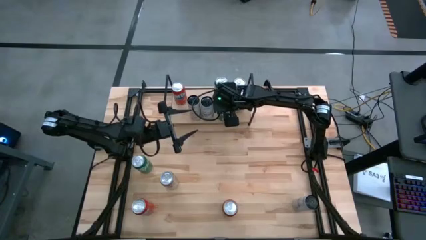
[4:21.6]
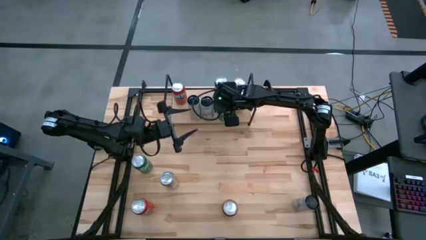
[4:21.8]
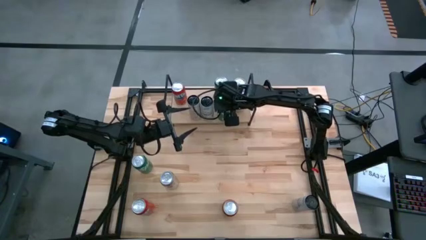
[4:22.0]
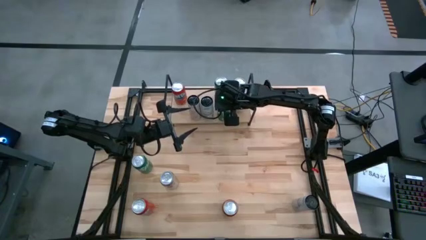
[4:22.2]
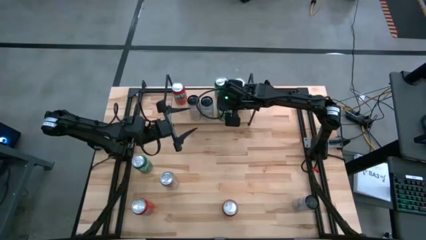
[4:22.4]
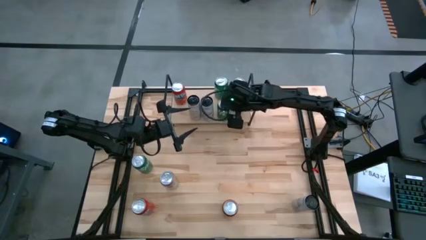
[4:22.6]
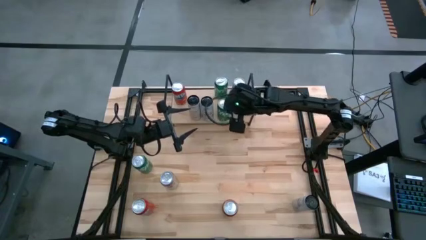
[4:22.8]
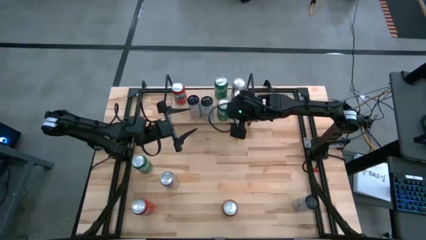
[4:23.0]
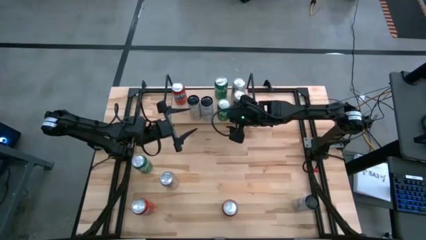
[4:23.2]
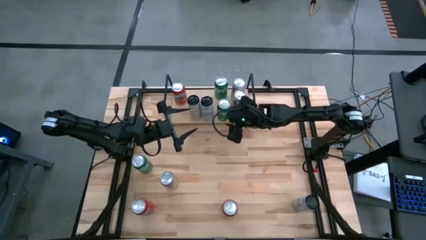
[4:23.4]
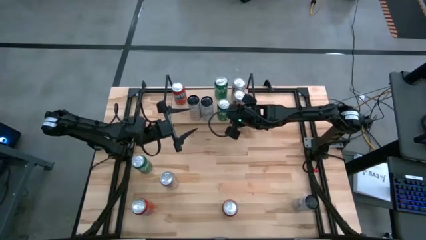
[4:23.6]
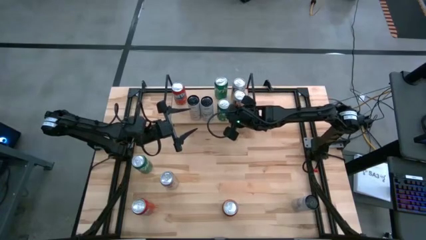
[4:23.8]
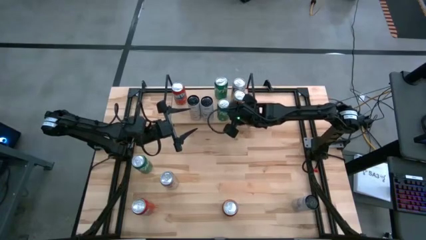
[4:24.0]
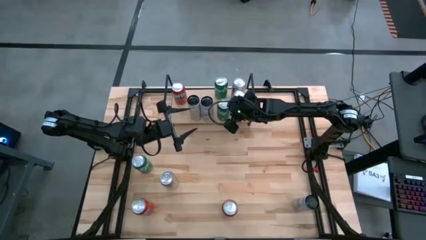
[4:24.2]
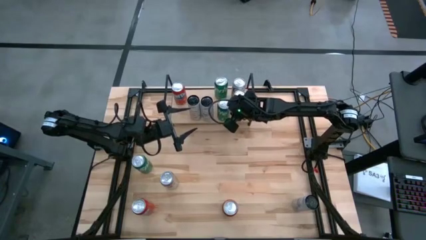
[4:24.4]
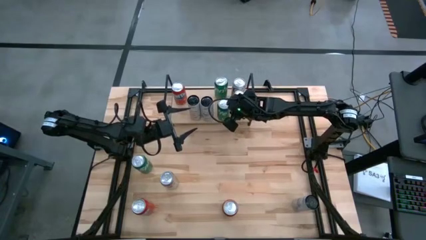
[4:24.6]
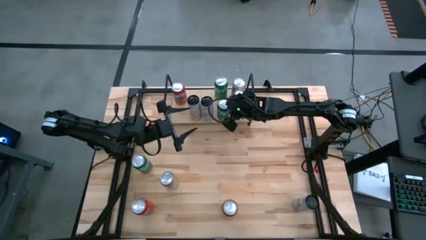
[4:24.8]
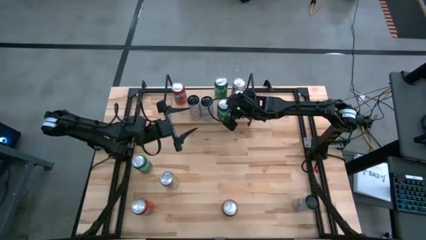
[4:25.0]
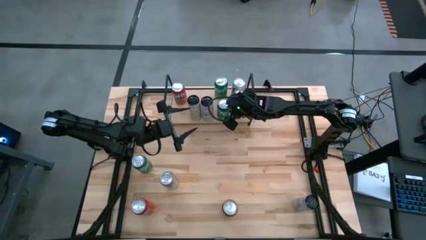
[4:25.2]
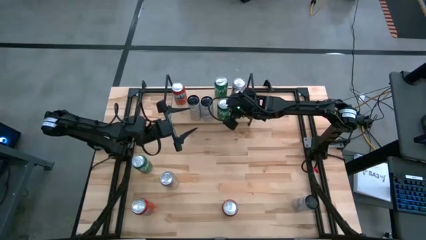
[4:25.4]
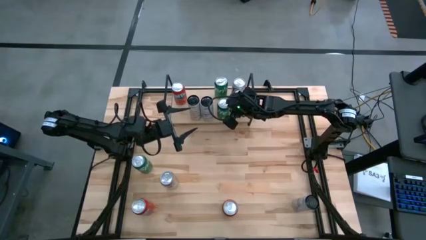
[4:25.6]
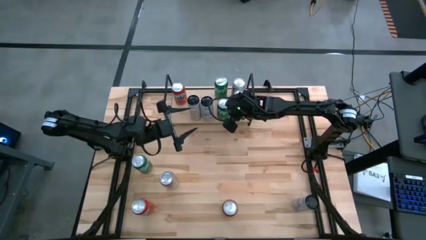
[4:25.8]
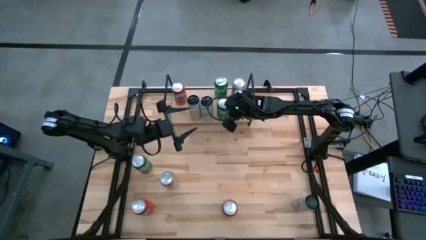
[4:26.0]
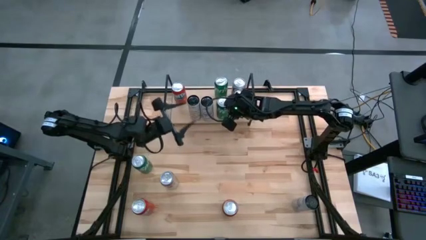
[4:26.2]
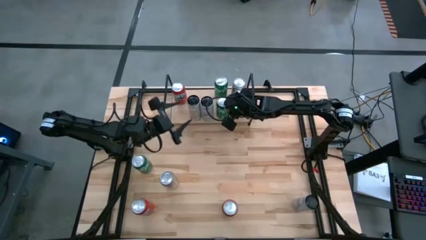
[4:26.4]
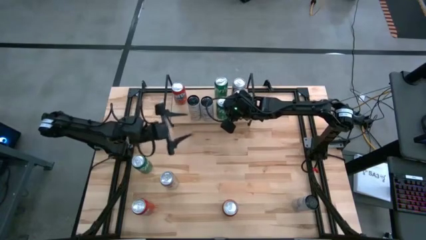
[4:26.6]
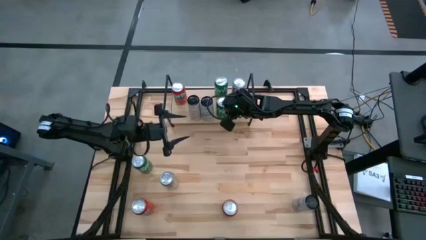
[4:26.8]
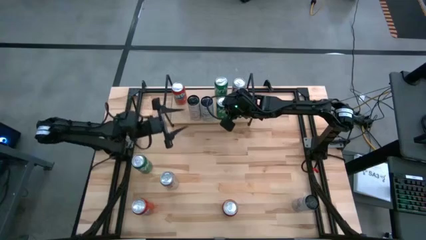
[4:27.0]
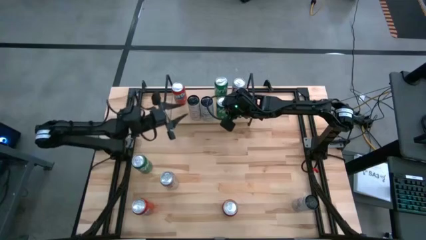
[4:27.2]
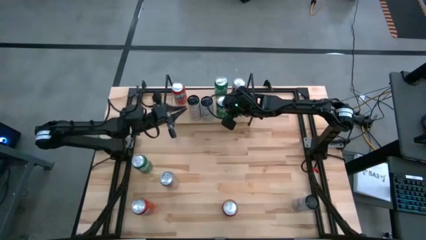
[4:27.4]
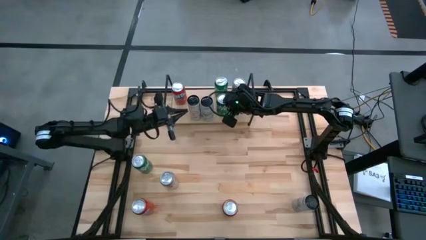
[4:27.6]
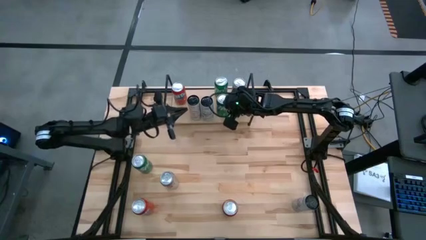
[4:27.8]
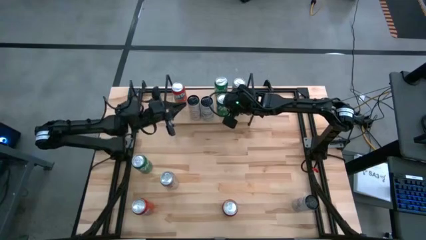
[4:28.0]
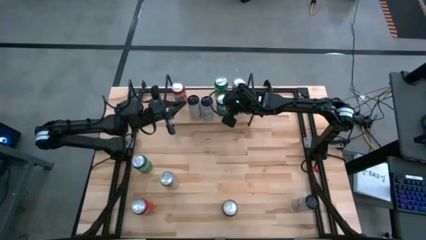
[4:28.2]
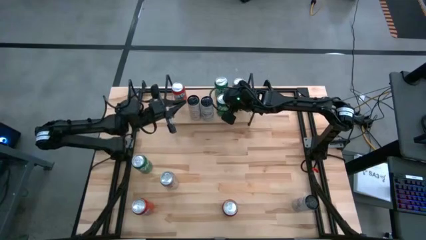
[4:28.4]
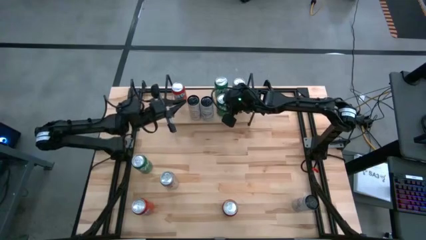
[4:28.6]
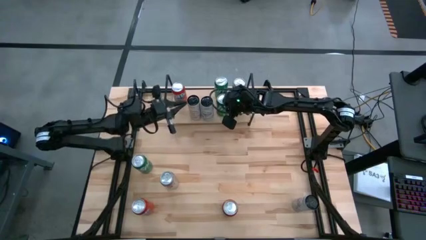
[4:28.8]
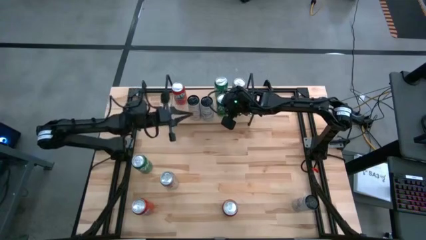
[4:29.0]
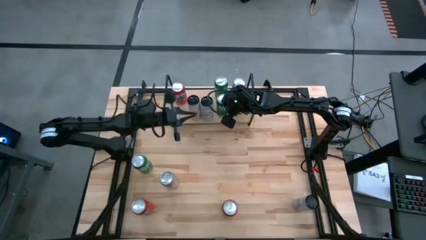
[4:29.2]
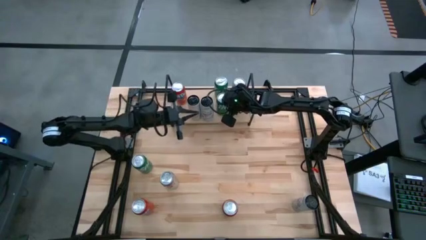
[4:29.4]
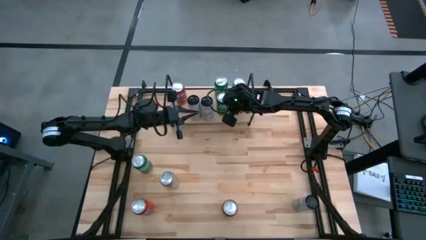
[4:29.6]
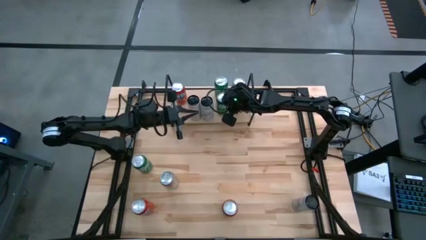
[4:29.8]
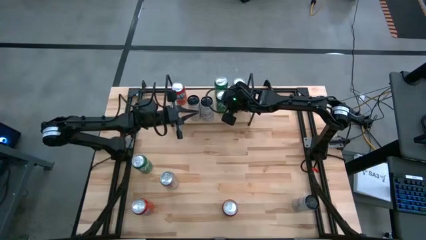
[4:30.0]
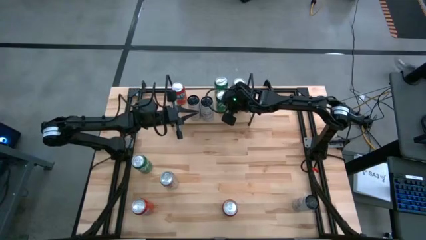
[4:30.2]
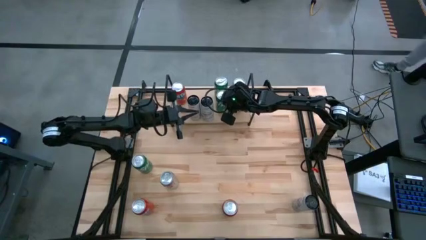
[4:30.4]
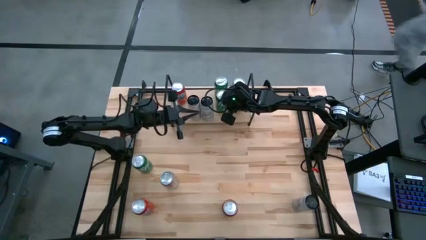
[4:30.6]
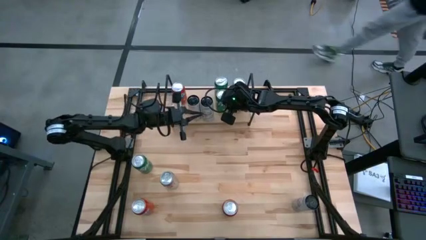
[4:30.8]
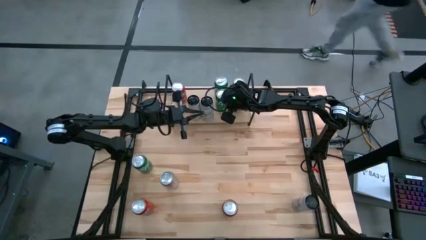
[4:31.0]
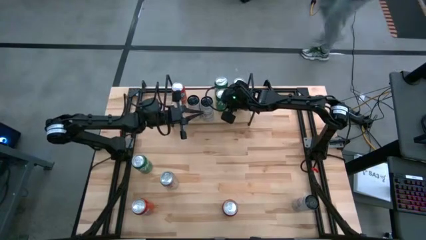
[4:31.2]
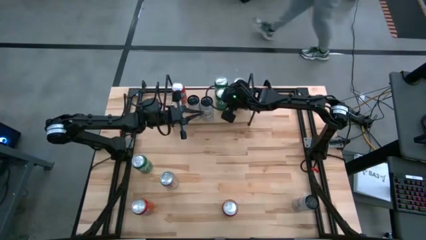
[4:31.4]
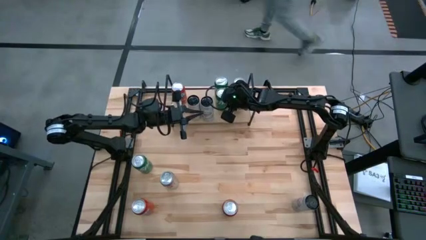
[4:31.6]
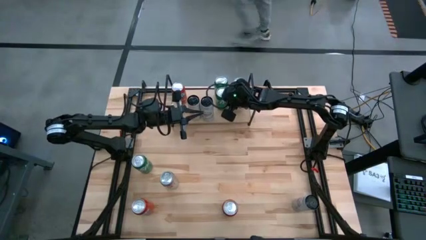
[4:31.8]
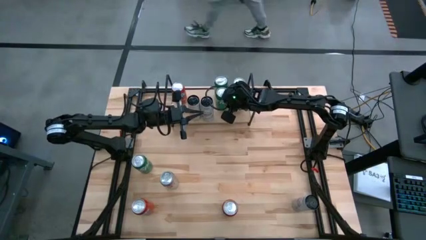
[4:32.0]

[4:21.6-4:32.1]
Task: Sort soda cans
Put the right green soda can on the shelf and align it with the other green soda can

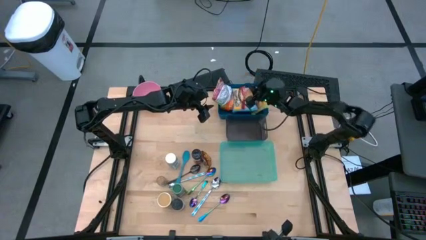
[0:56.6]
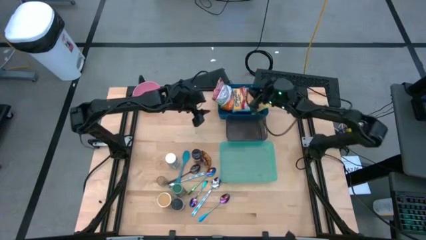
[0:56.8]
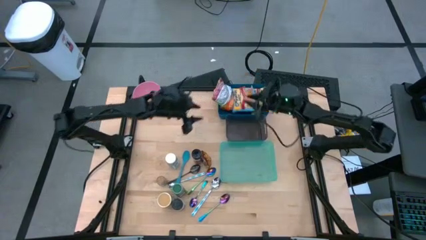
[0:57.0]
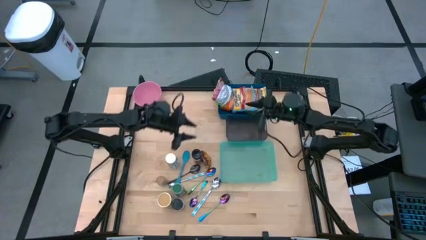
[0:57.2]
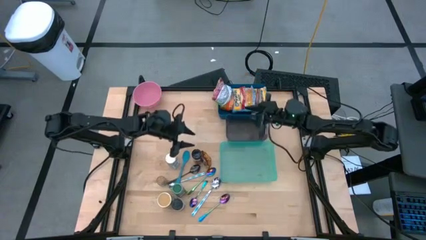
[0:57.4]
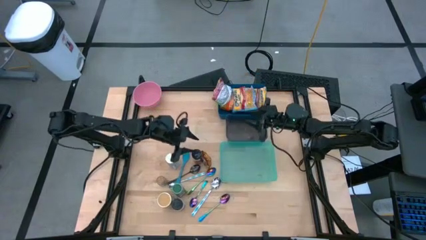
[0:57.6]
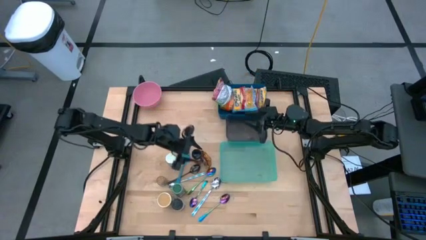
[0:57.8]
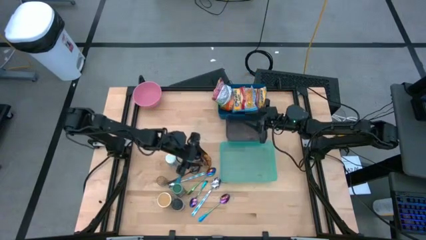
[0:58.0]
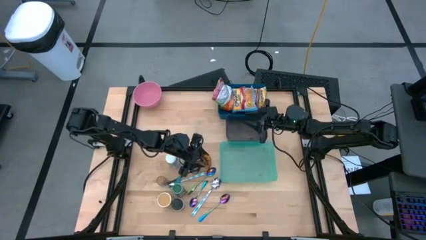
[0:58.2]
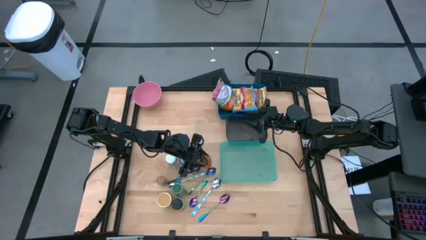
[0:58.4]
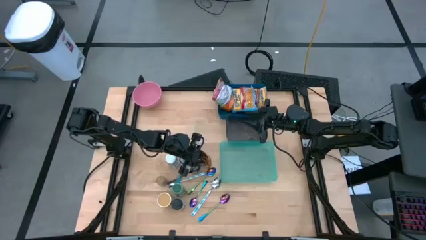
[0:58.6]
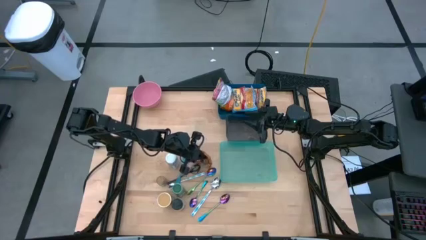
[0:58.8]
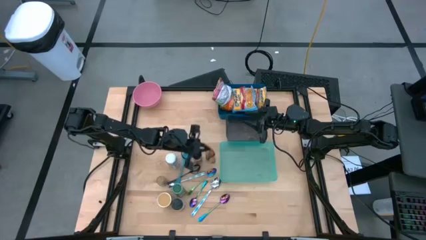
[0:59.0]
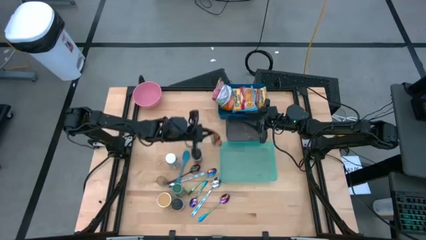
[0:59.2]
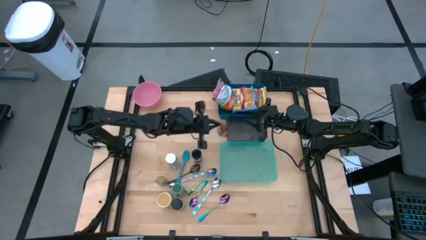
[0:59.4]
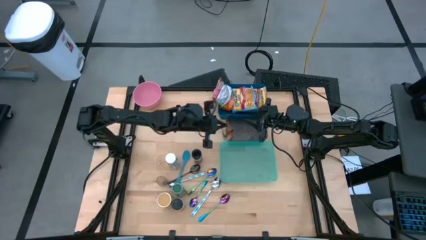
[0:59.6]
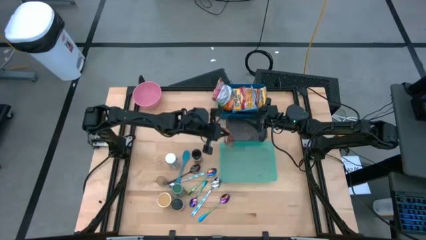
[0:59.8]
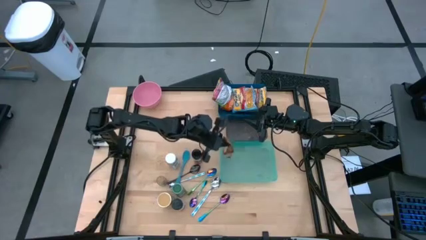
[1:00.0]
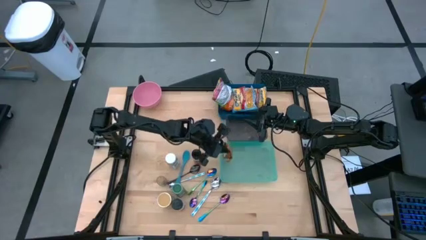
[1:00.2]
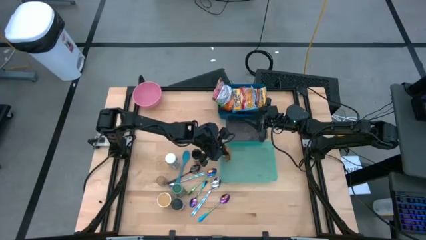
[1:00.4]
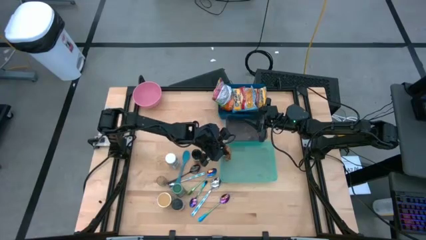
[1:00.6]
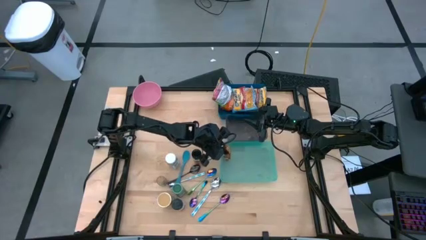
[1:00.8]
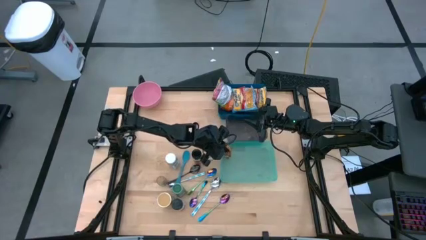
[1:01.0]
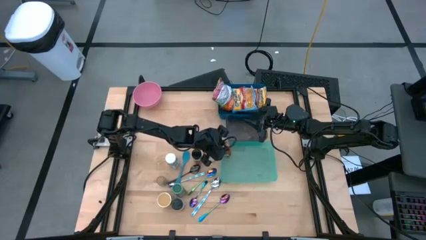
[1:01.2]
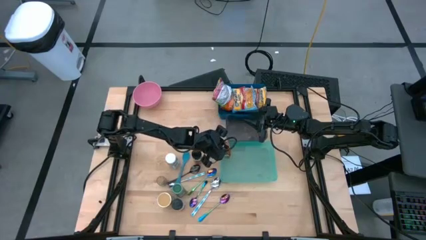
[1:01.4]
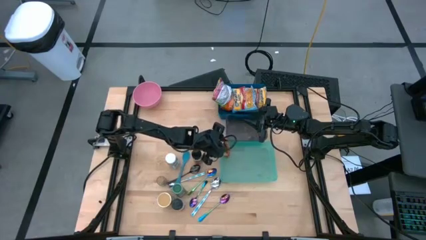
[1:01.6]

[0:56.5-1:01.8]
Task: Pick & Place Food Item
Put the orange seasoning bag into the green bin
